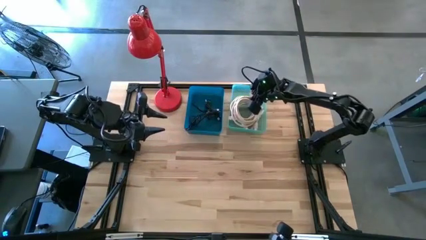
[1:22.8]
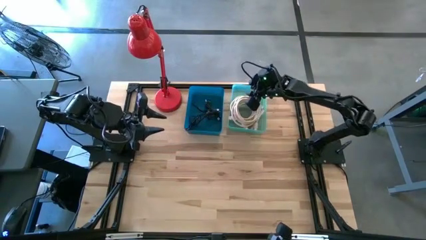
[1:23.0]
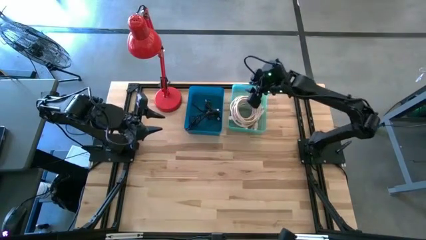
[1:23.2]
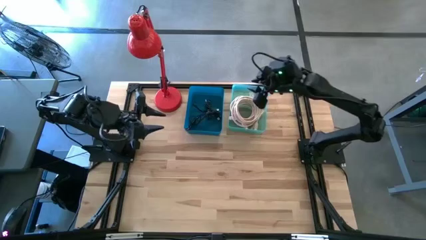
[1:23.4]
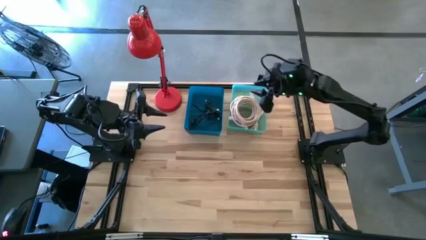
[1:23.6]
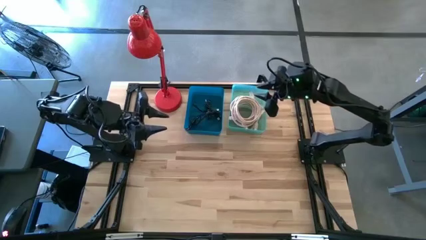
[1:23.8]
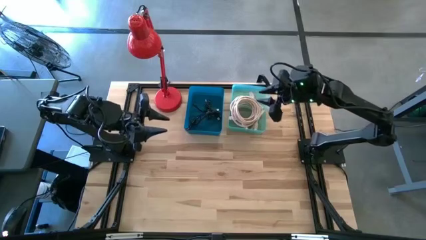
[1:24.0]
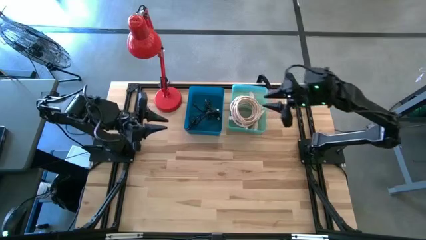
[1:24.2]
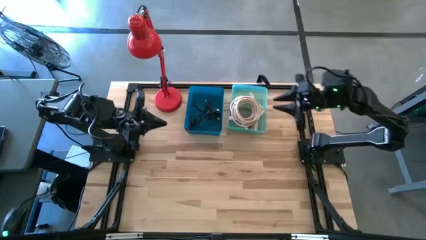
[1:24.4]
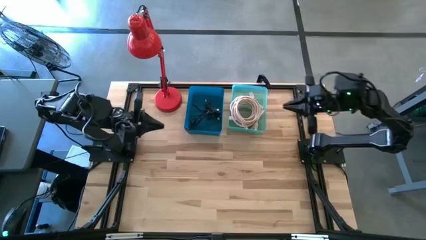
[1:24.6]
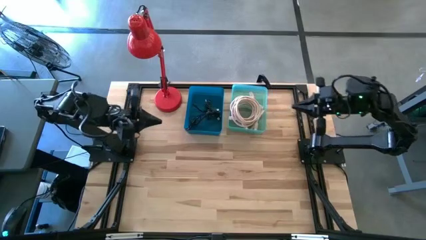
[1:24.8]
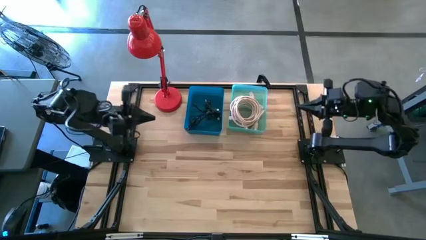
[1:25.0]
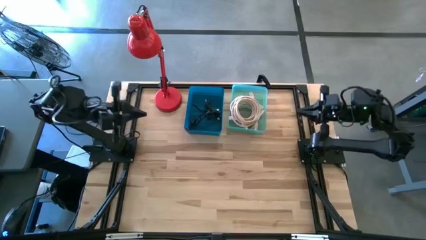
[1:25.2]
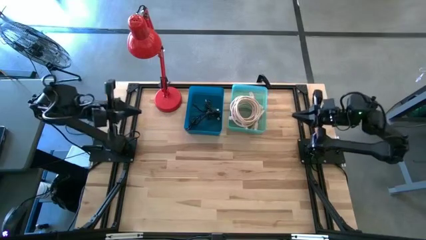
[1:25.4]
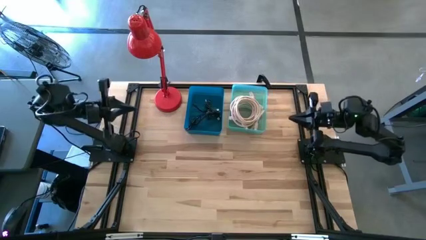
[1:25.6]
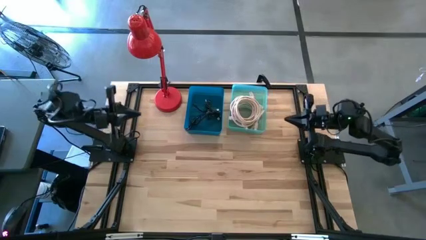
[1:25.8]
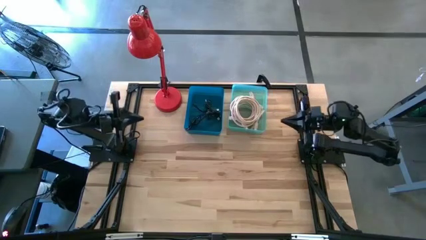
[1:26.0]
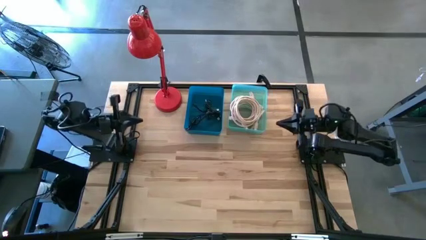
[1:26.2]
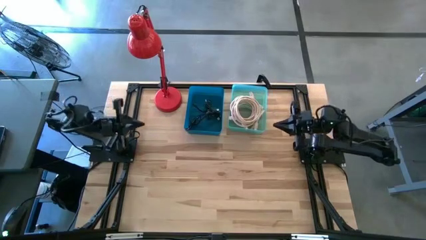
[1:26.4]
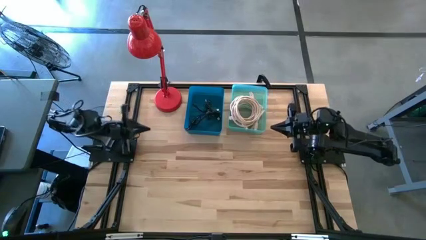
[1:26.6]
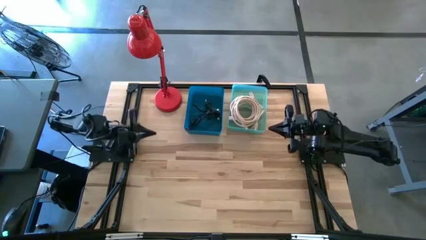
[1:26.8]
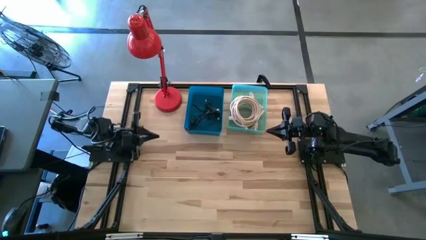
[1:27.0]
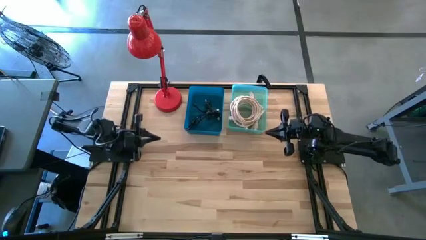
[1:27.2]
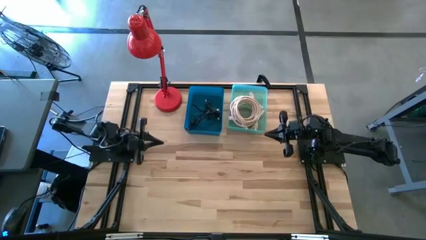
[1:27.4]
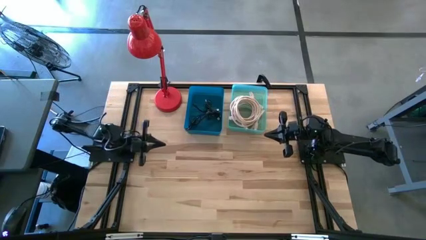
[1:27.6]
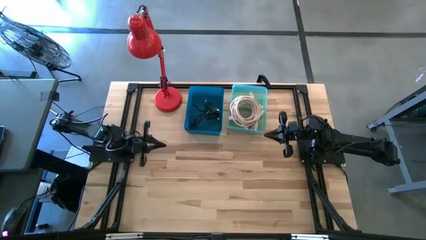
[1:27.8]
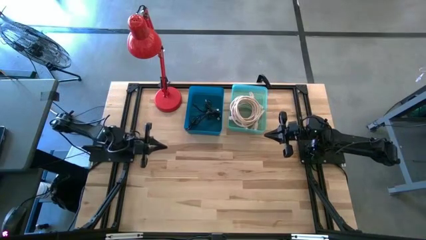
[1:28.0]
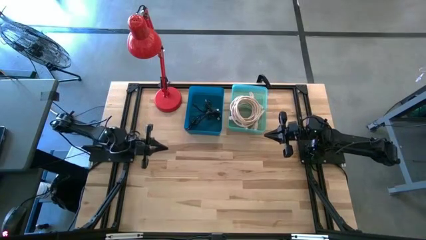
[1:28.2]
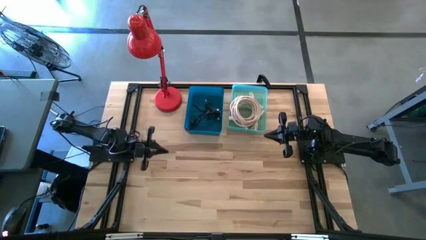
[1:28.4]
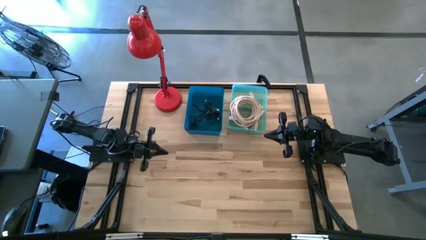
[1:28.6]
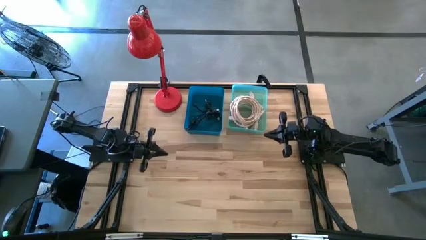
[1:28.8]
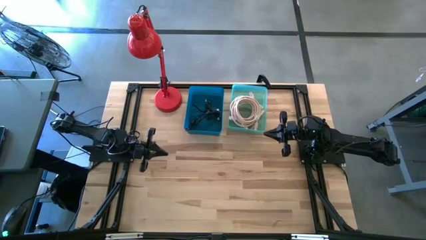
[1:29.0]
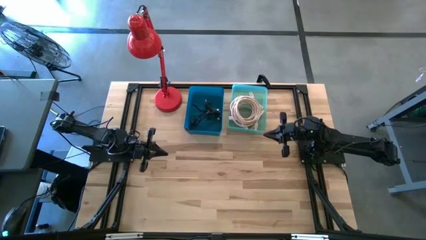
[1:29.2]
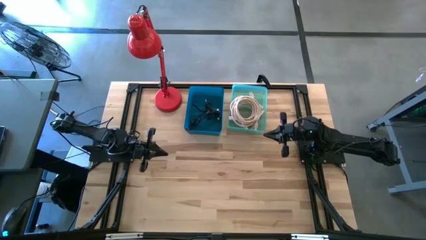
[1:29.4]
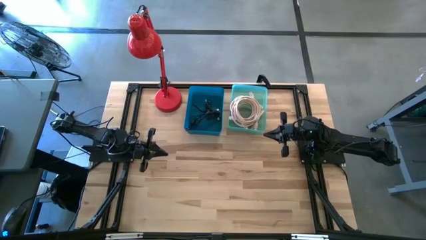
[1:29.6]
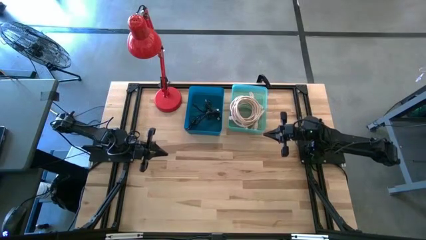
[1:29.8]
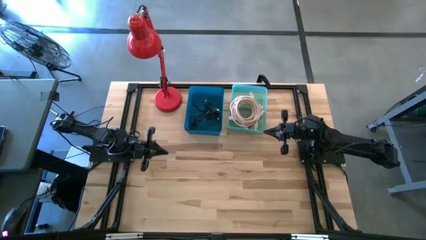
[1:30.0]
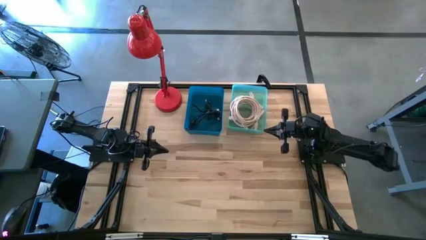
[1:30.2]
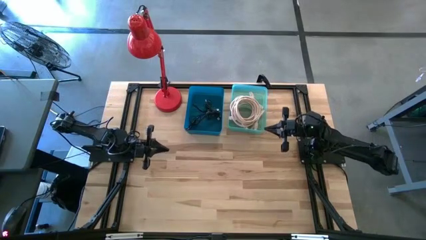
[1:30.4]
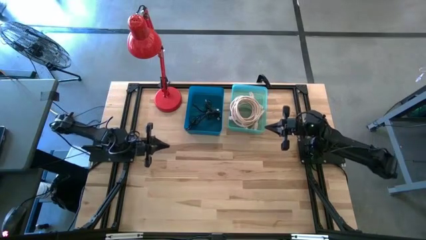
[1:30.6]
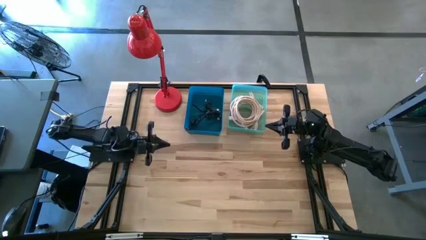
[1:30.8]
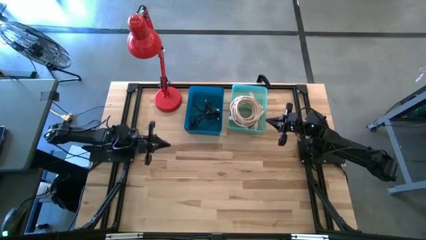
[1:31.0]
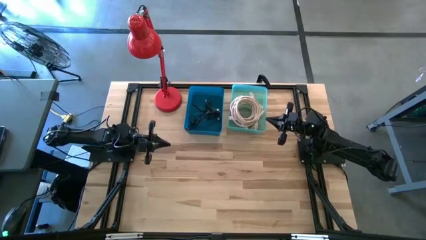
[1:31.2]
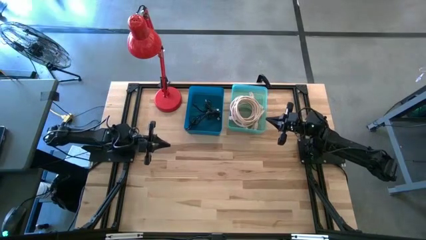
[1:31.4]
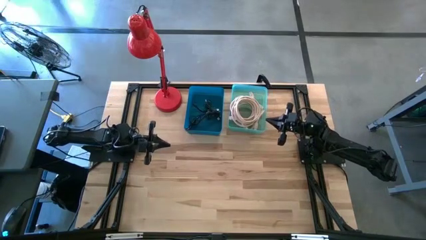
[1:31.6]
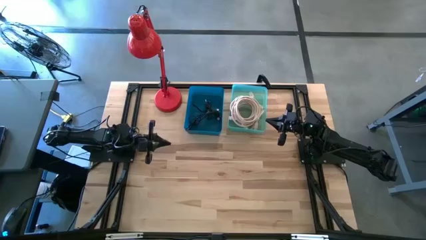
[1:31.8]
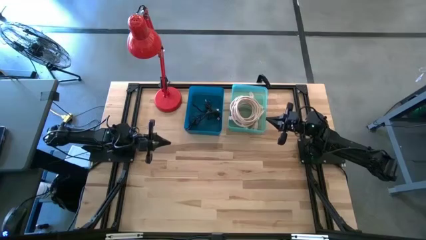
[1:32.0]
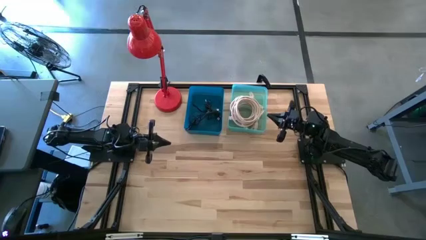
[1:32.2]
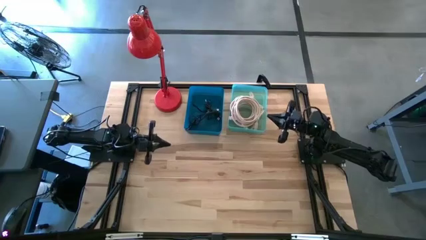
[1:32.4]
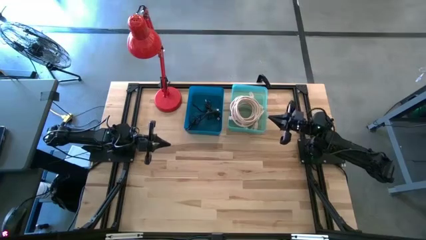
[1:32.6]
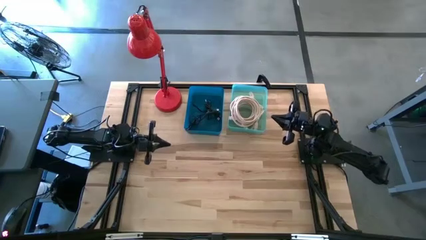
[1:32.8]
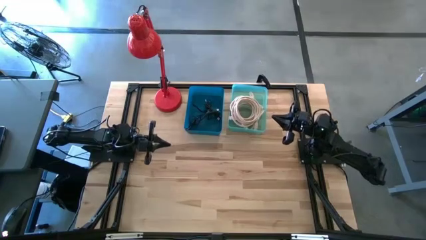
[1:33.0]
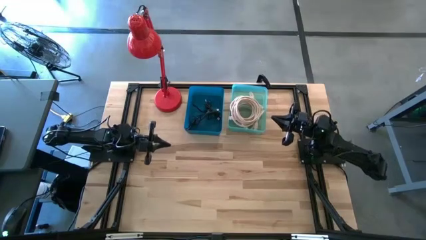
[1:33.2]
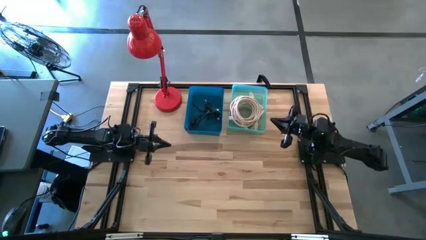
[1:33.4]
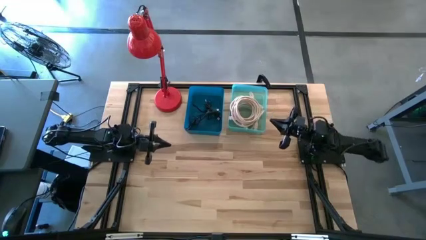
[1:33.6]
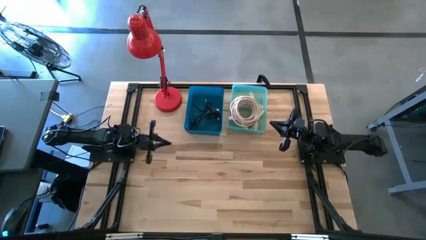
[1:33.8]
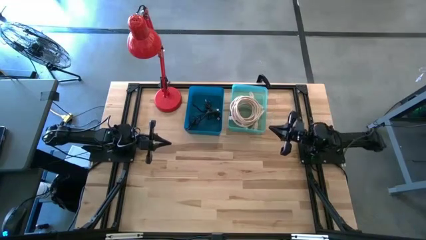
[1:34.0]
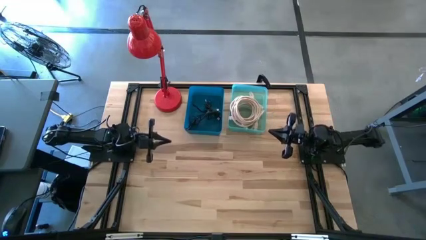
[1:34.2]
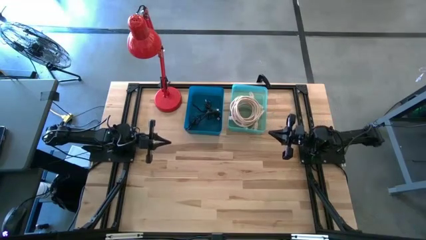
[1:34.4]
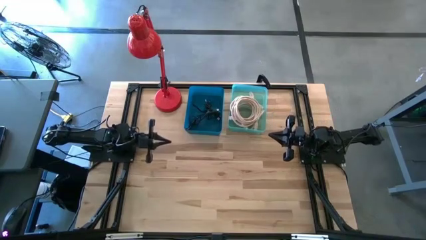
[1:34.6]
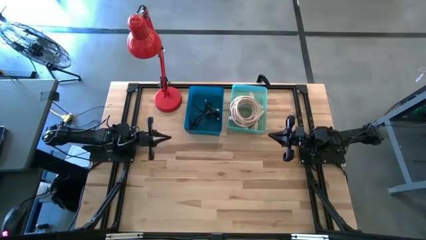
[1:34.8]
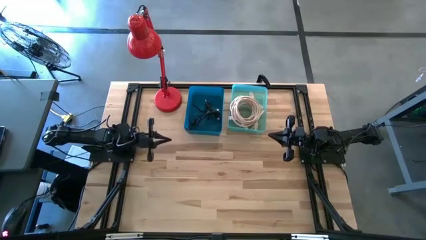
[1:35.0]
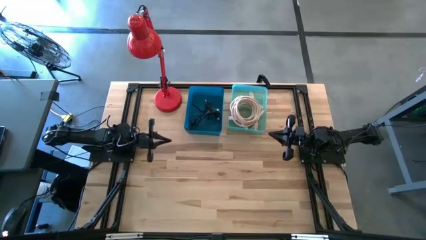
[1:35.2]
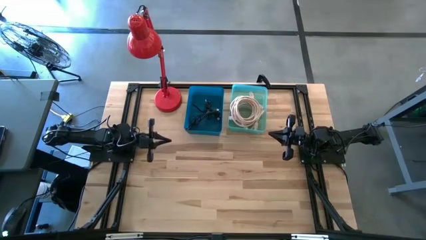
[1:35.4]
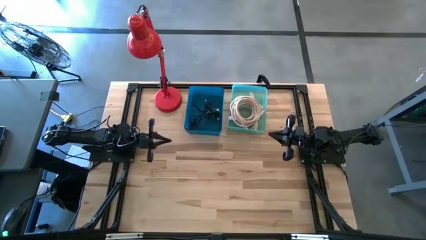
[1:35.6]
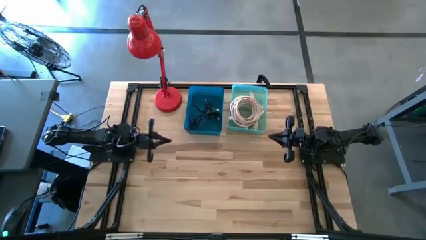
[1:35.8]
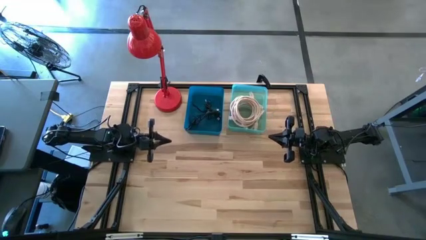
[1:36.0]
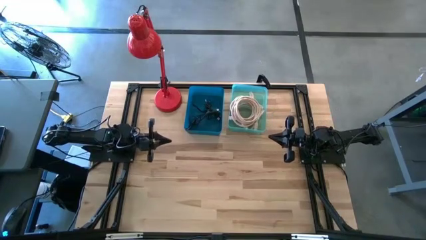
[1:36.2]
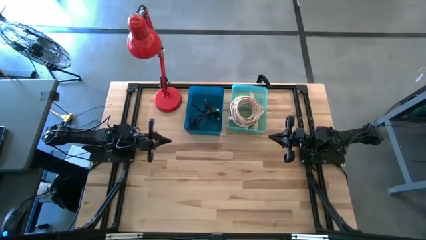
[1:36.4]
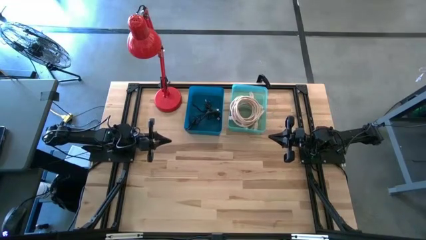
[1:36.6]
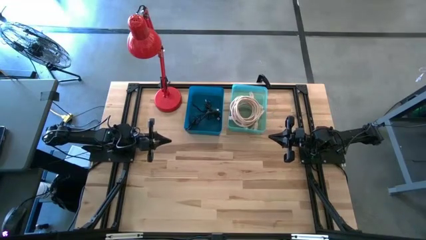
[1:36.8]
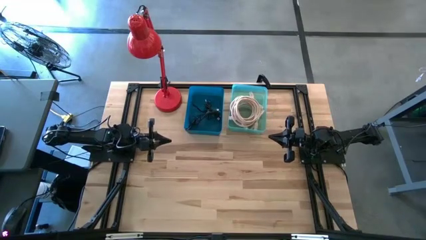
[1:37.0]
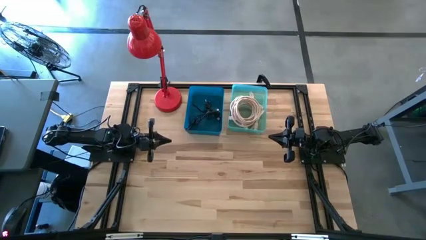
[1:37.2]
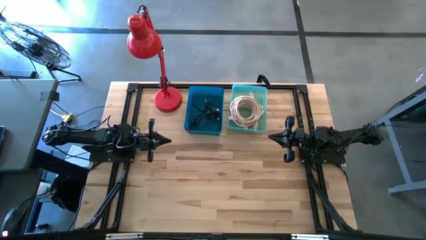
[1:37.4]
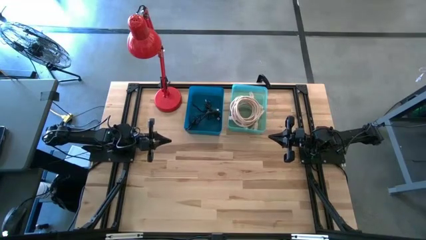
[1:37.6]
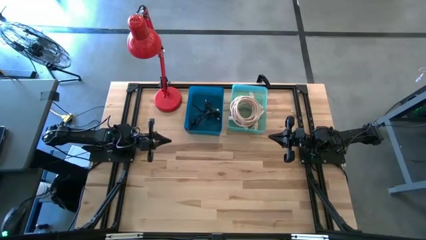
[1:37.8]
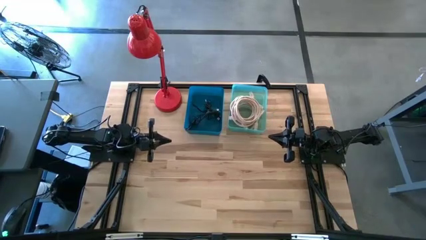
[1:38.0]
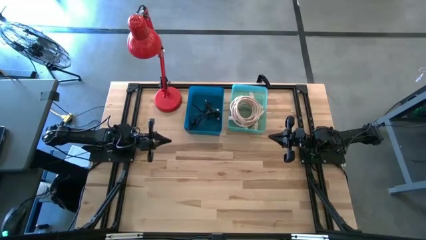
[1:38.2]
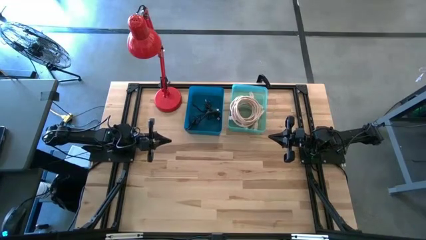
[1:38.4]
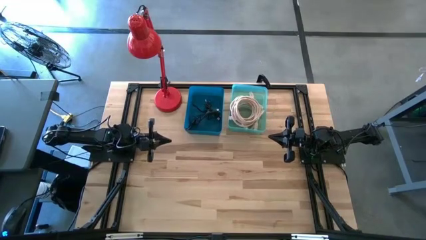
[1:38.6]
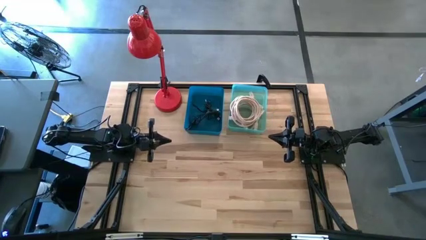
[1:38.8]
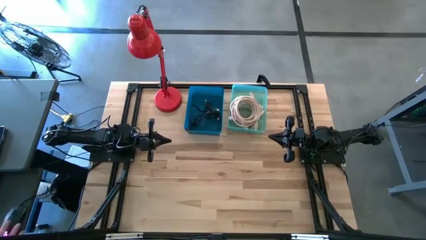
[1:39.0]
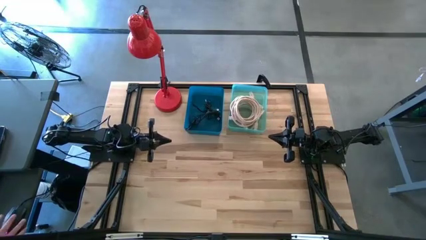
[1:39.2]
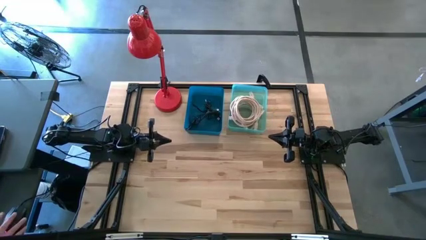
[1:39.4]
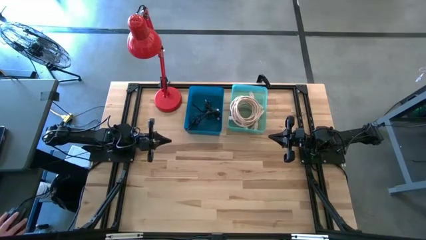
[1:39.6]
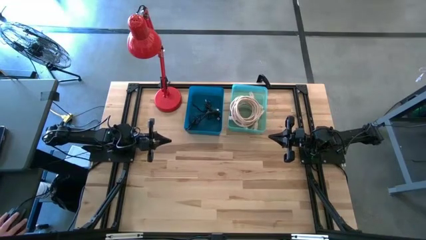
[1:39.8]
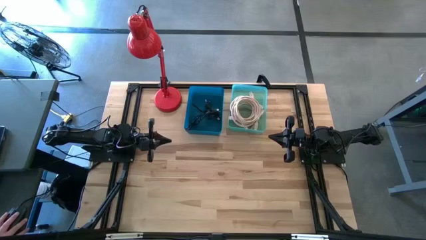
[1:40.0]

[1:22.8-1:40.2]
Task: Pick & Place USB Port
Return to Home Position
